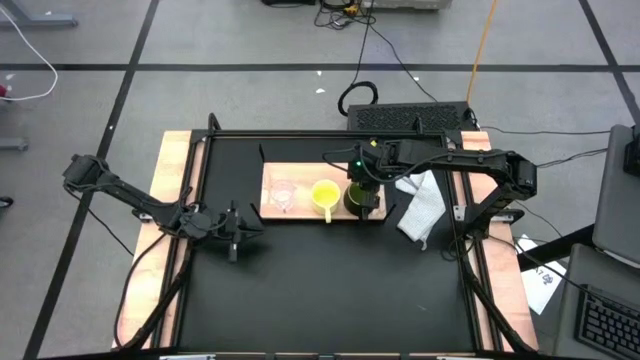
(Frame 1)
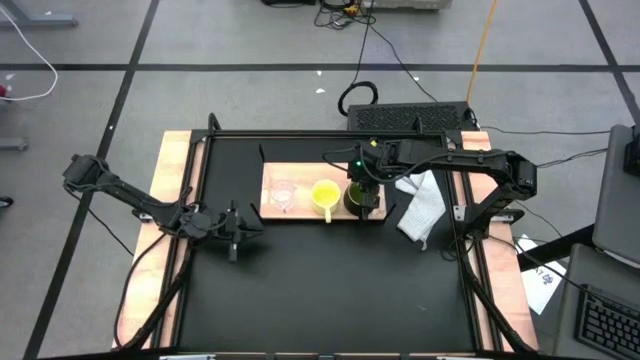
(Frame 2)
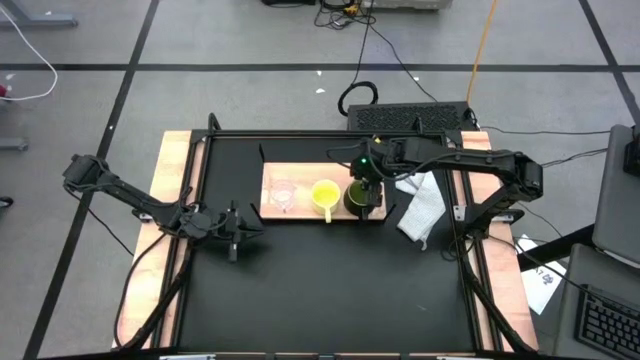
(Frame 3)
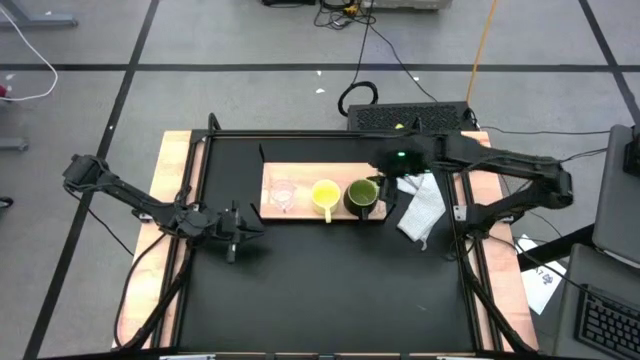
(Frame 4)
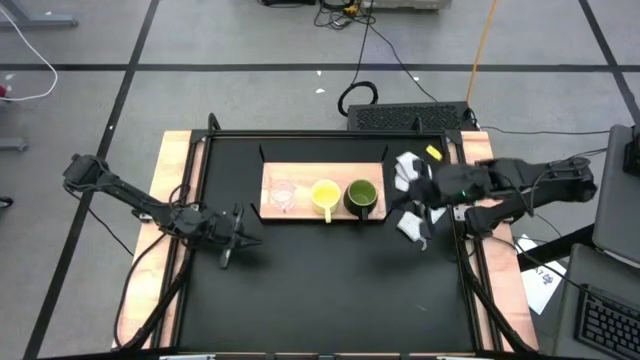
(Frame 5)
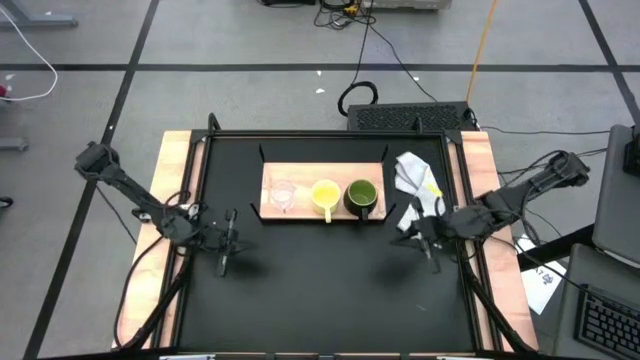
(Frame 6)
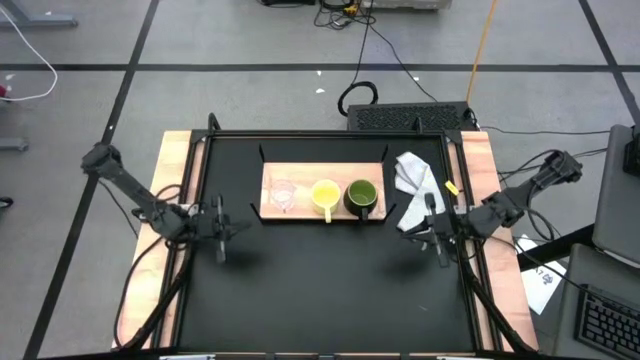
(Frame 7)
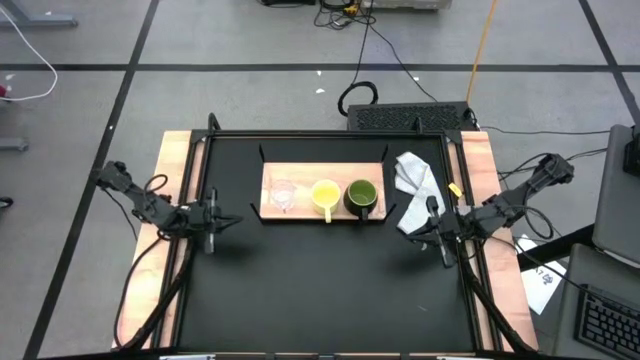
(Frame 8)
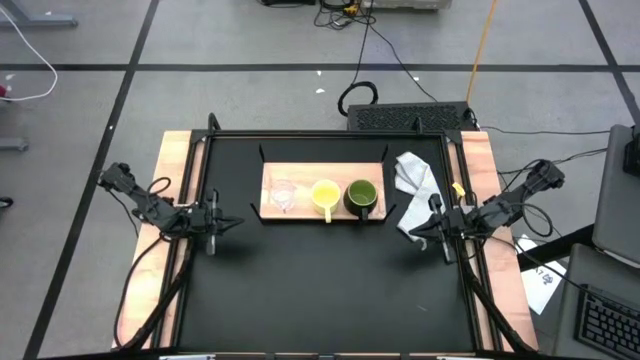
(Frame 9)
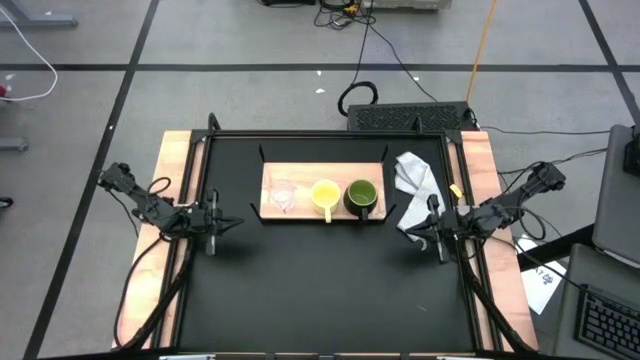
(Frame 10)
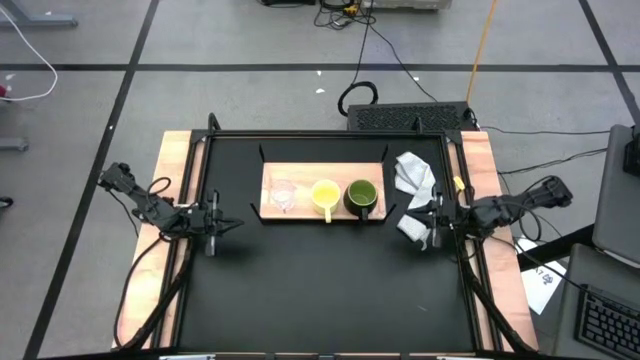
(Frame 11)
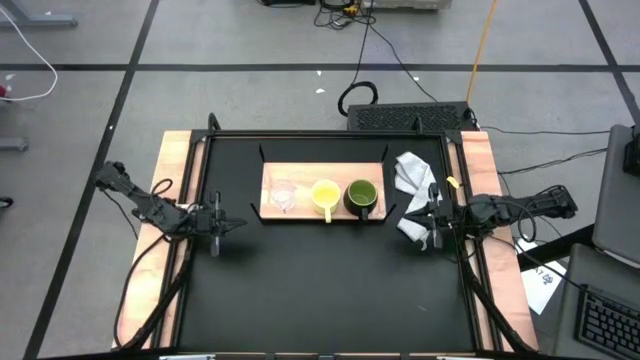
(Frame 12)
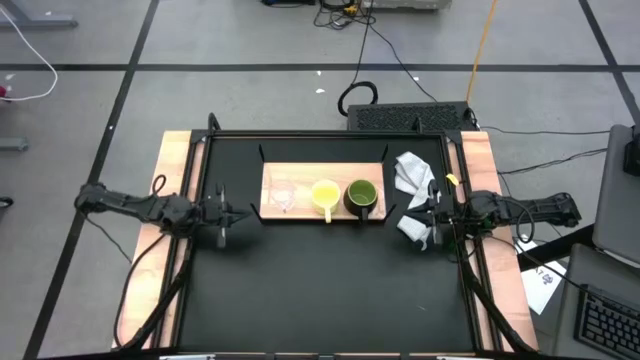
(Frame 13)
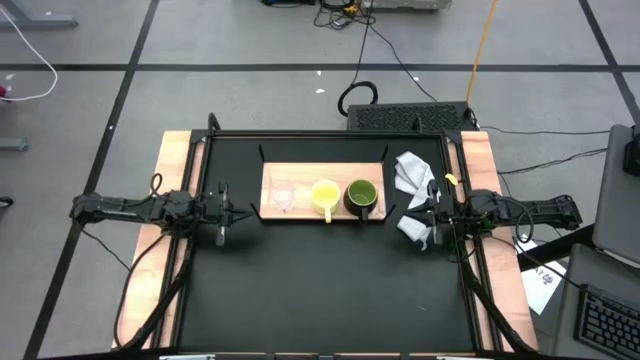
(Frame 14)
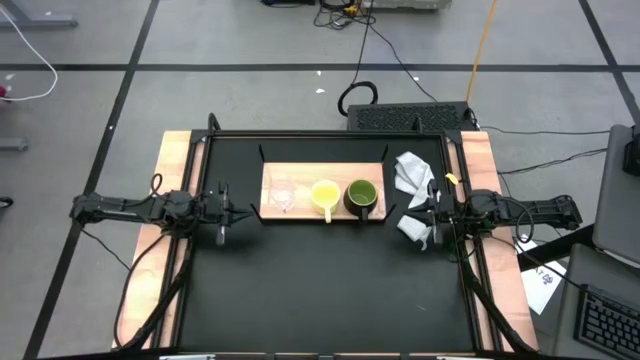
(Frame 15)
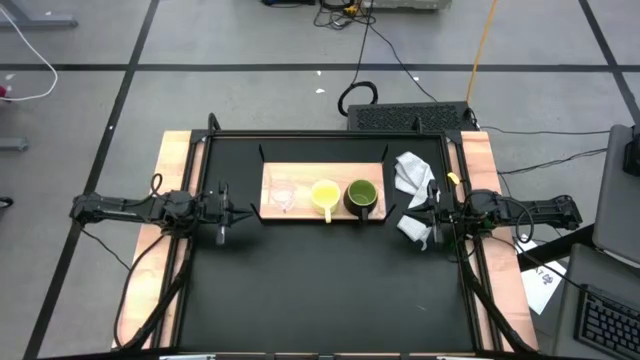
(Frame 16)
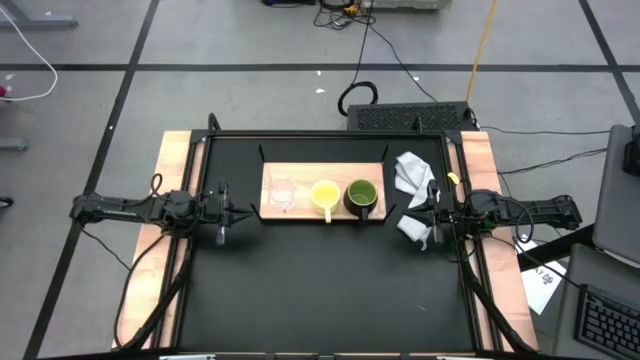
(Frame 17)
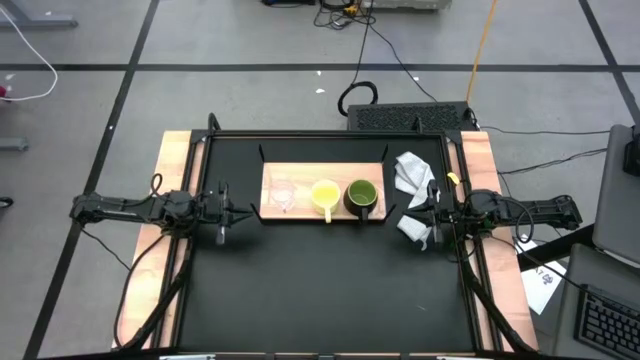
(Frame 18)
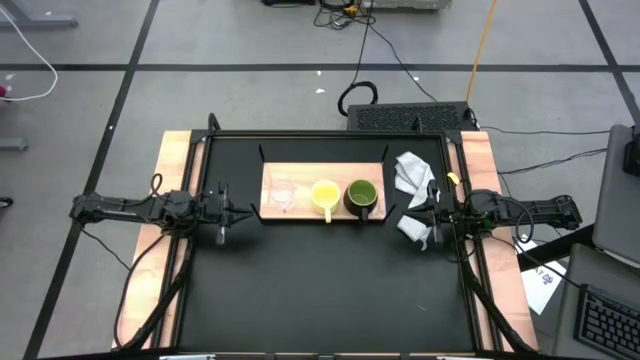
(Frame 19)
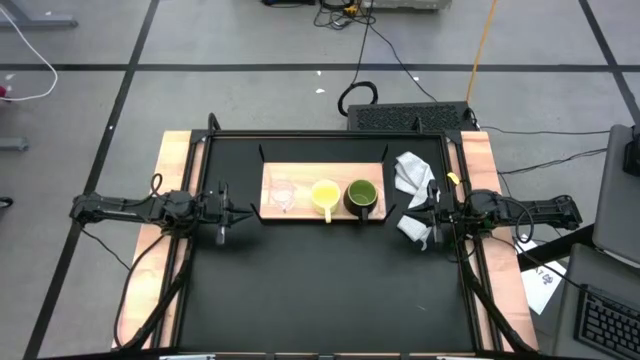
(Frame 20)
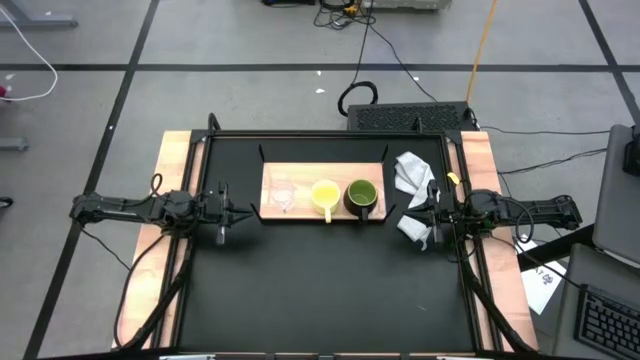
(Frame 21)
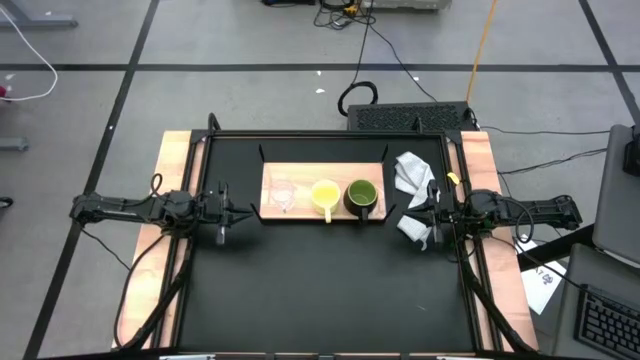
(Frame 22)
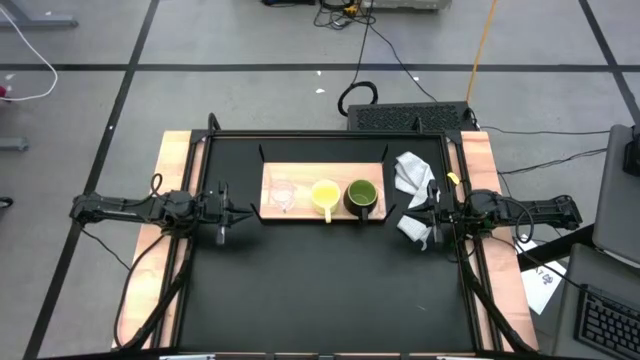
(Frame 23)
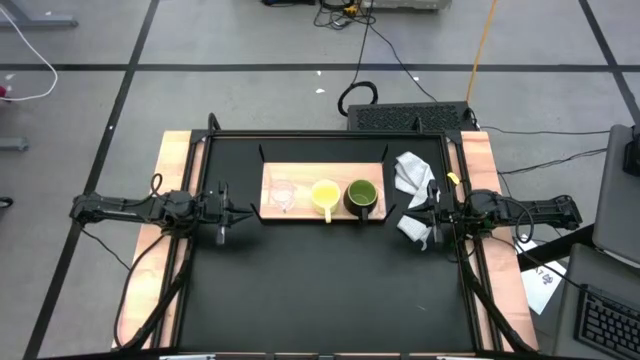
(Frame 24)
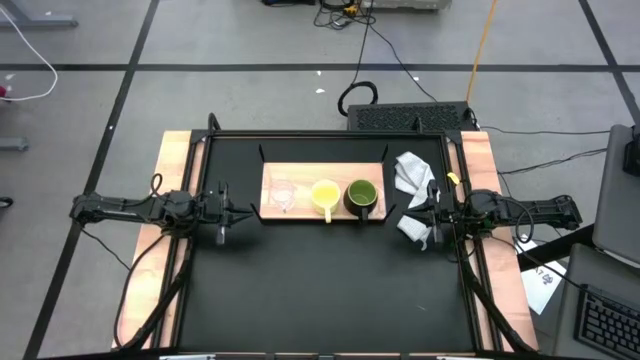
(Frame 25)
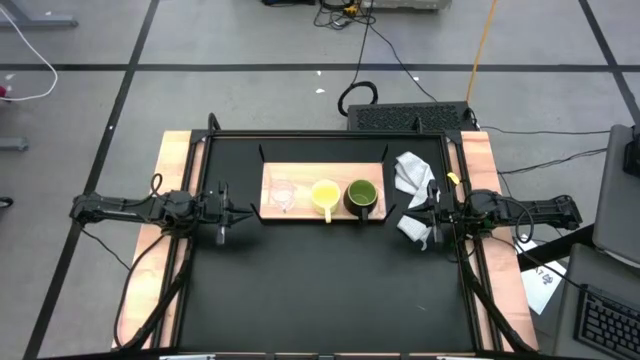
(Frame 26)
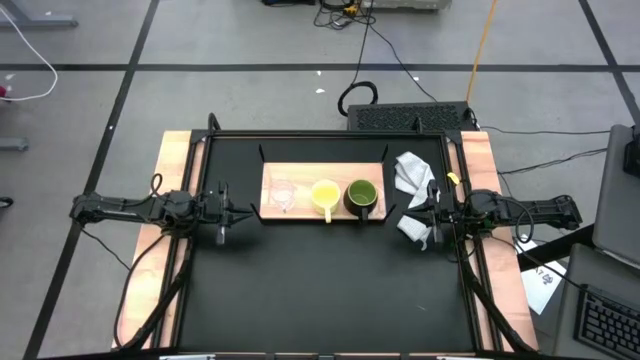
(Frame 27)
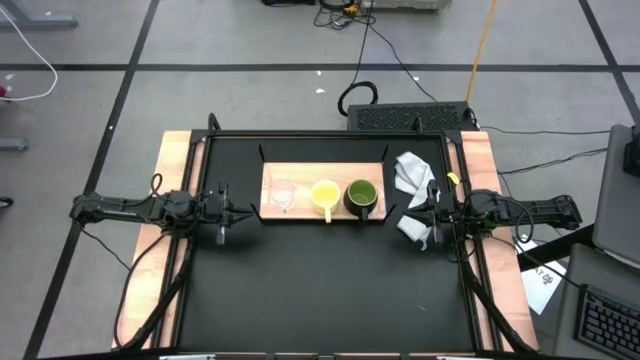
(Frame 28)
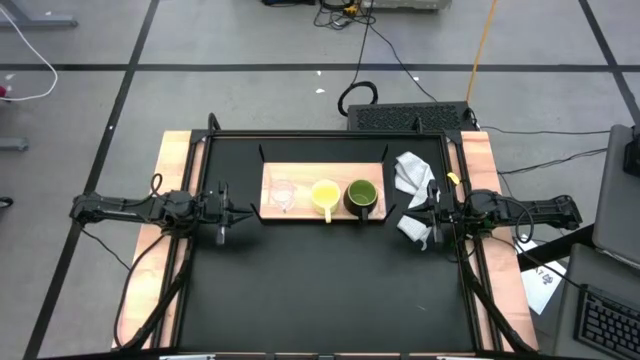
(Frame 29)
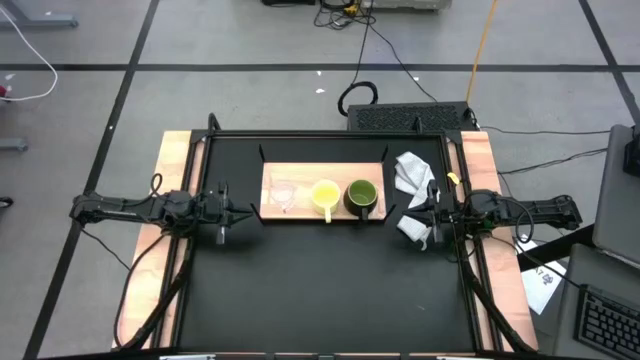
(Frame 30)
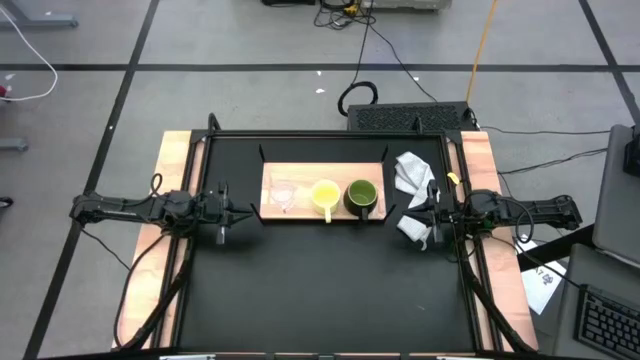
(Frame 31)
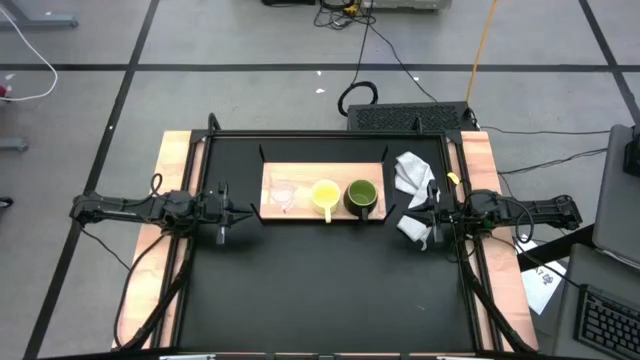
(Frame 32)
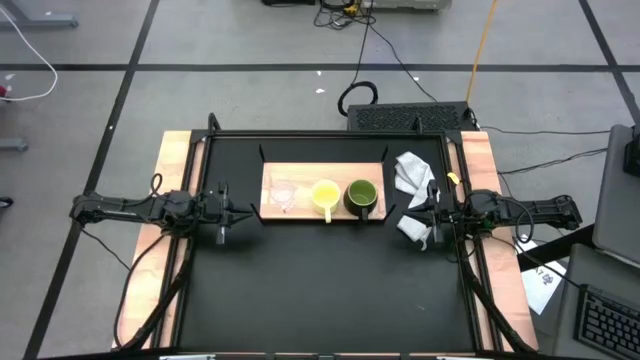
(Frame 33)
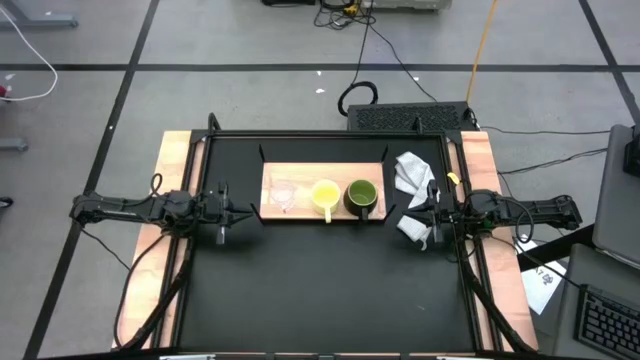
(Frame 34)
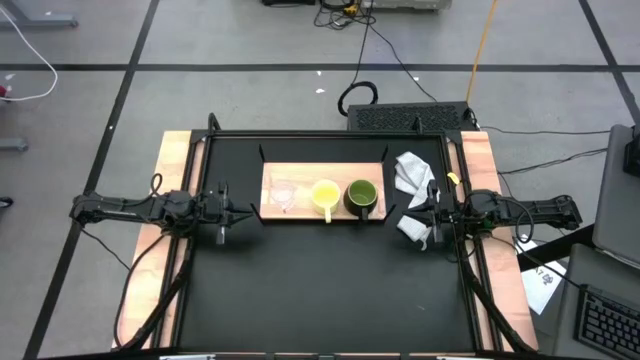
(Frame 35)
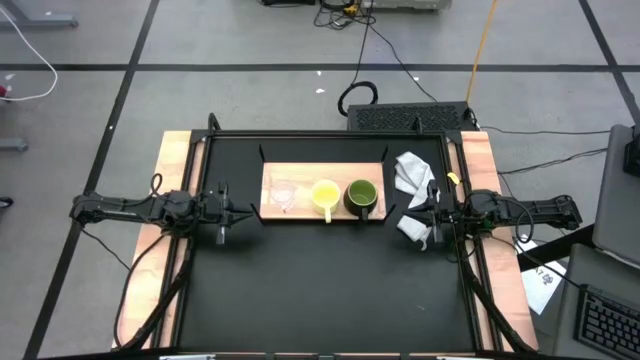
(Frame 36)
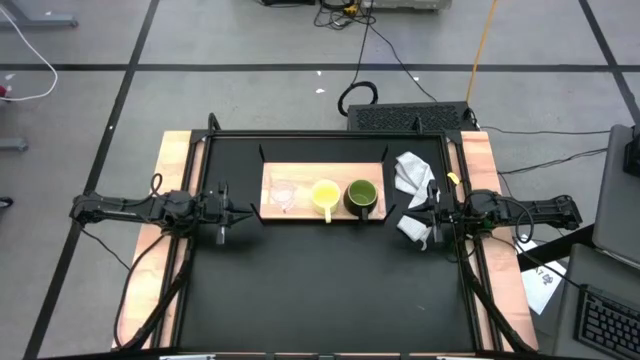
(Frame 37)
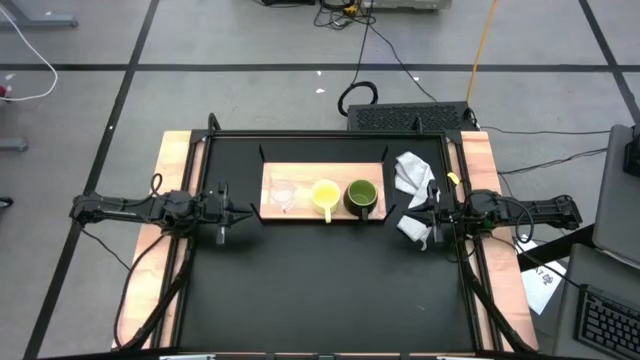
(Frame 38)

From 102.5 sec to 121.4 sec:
Task: Stack small to large cups/mugs on shelf
Return to Home Position

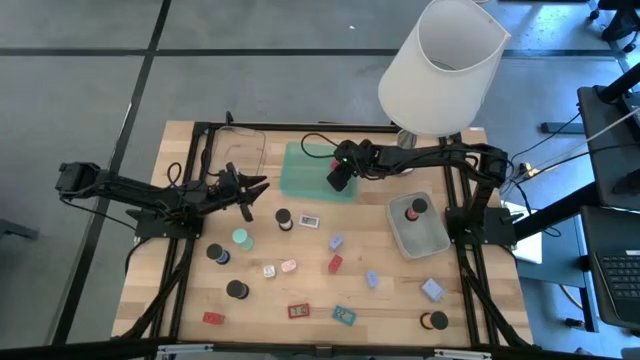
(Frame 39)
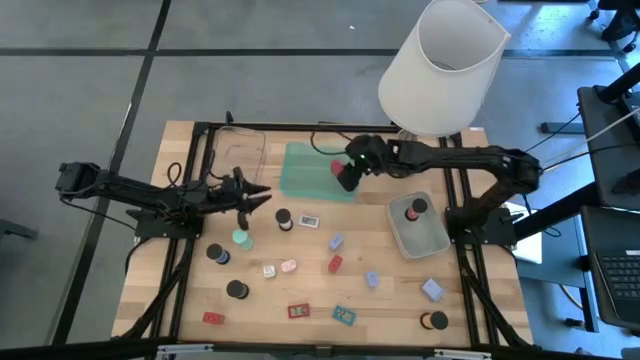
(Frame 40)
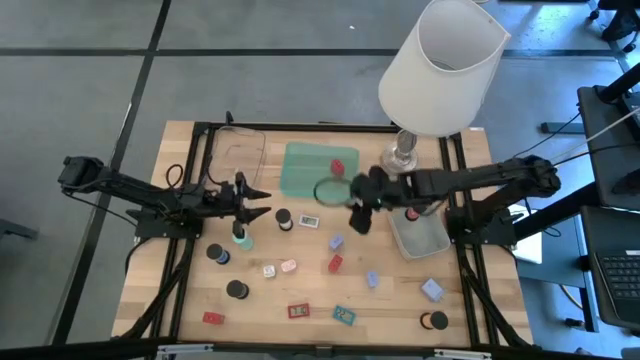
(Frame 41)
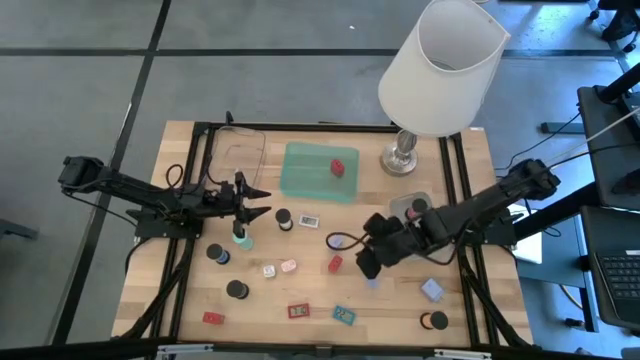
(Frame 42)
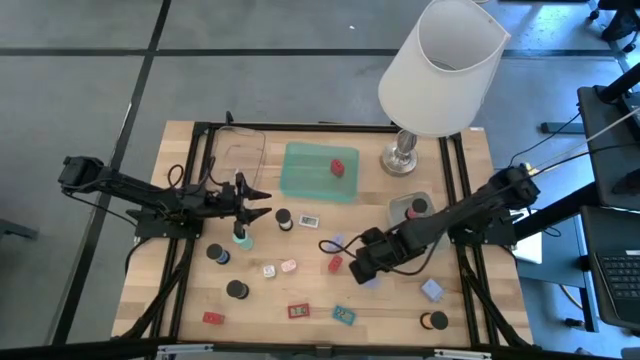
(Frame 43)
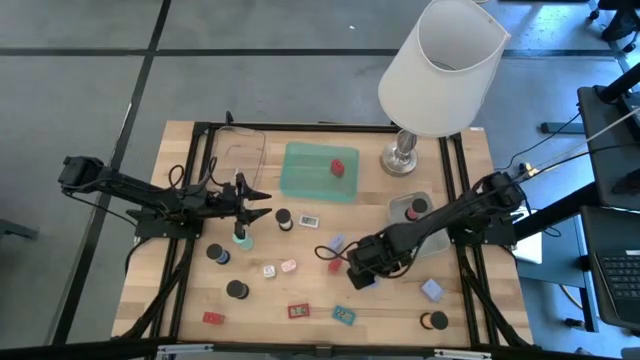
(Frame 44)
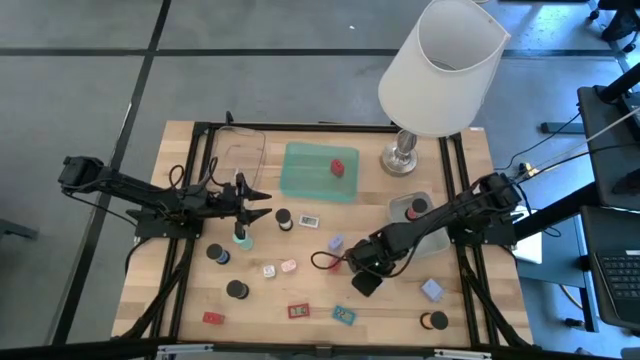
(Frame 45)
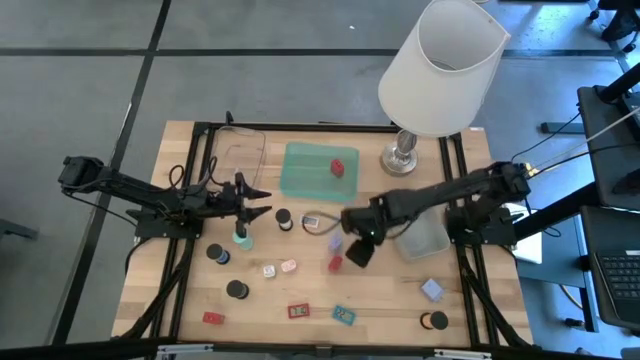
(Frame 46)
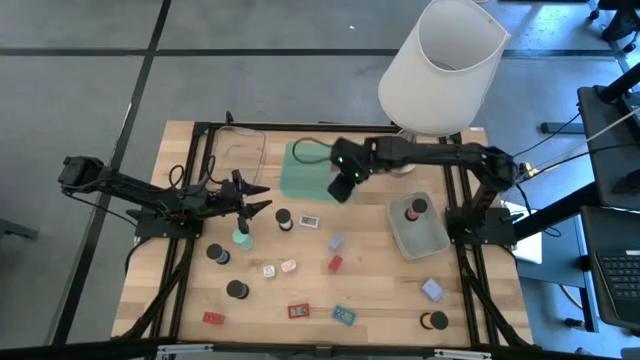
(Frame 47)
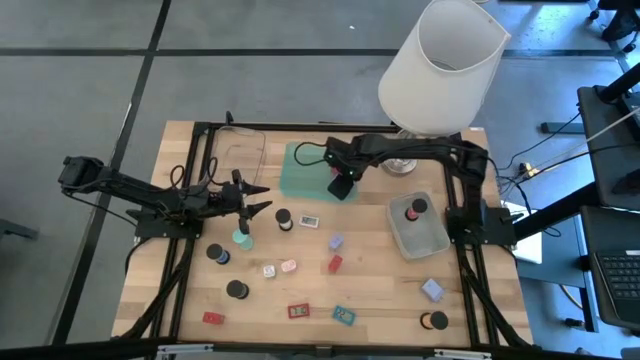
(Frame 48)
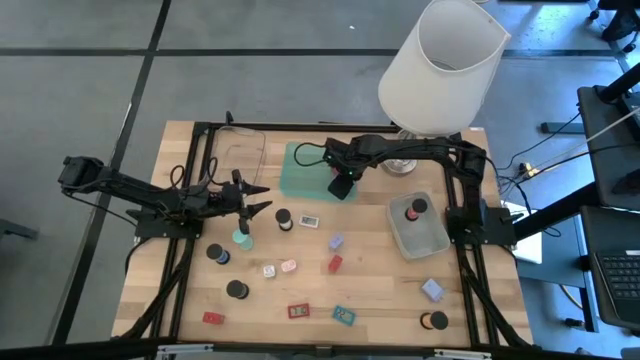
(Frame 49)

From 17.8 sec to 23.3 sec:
Task: Pick & Place Office items
Put the middle blue charger adapter into the green bin
